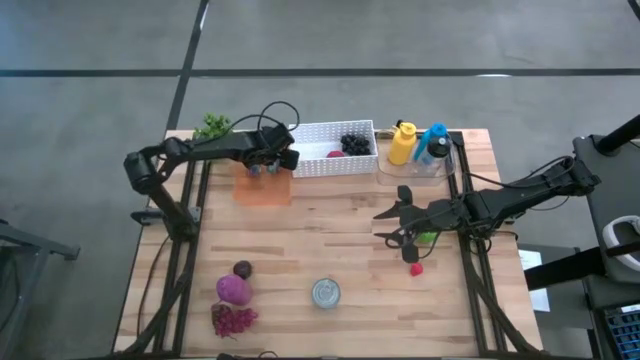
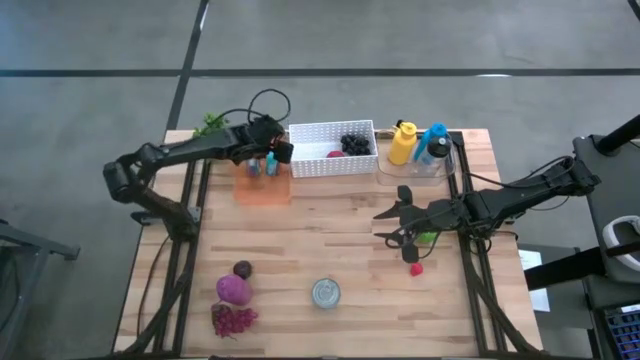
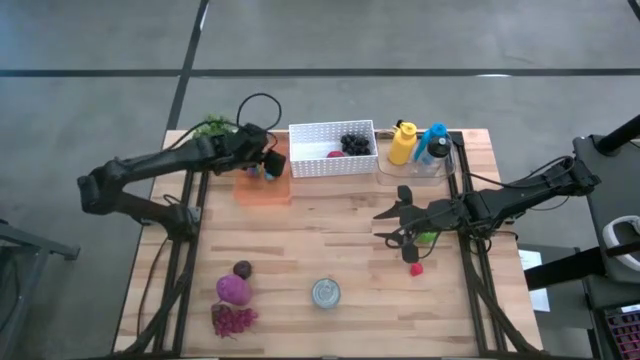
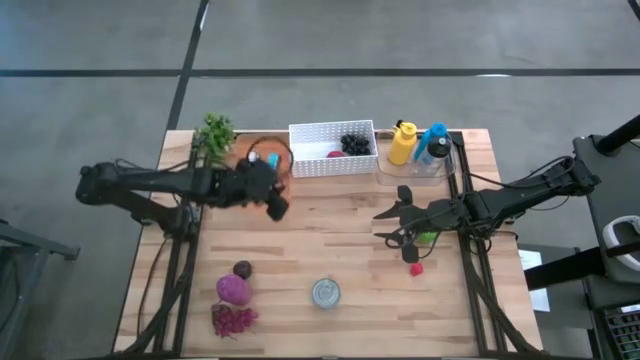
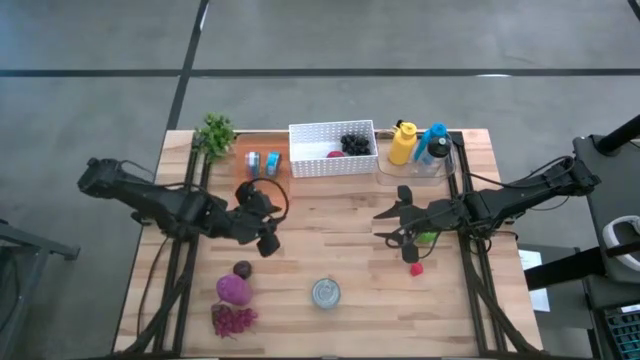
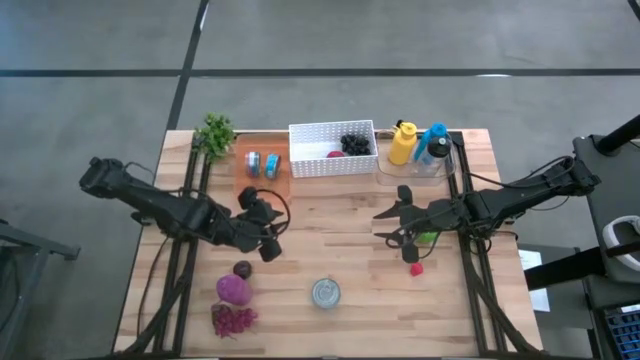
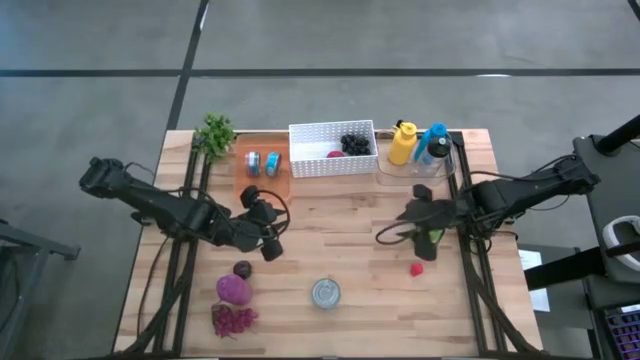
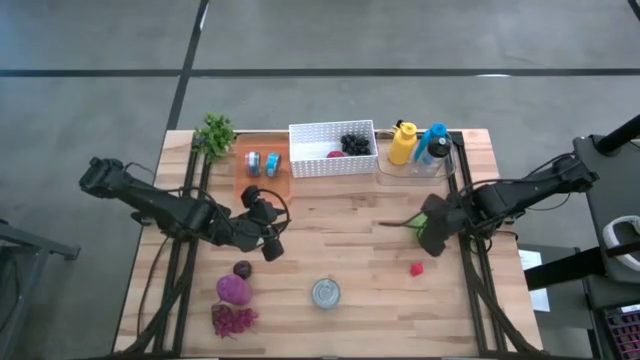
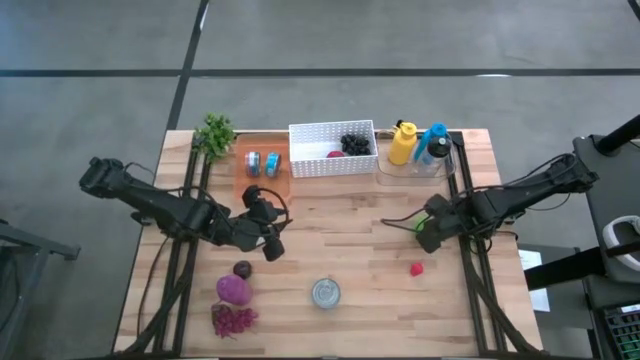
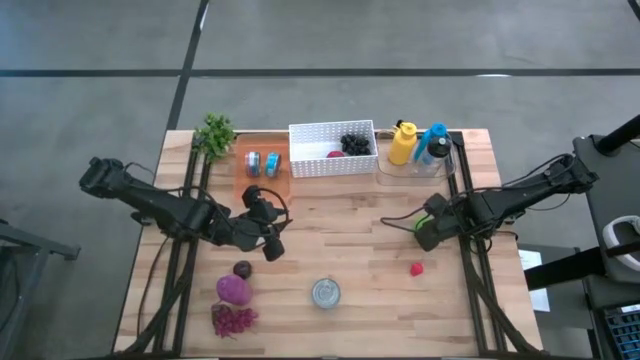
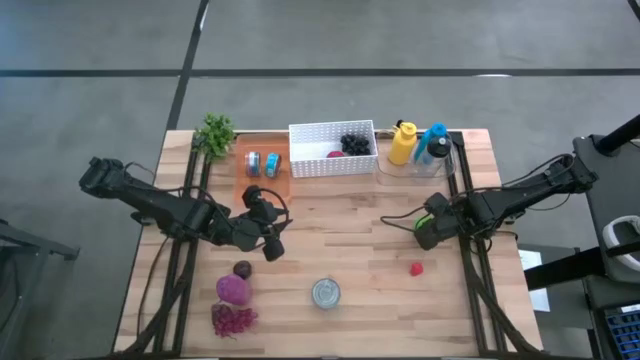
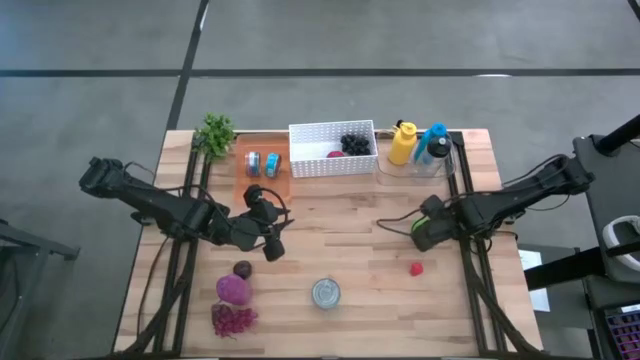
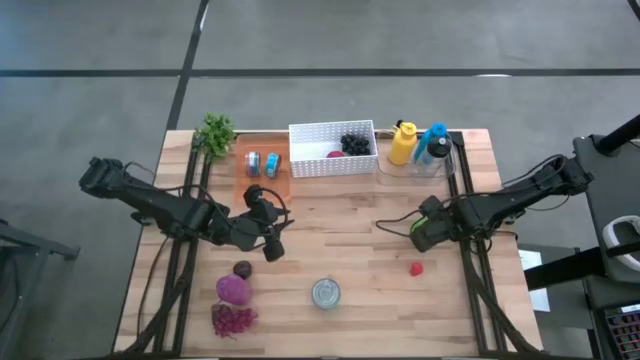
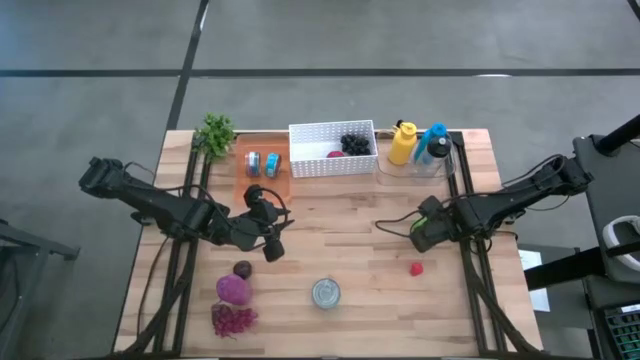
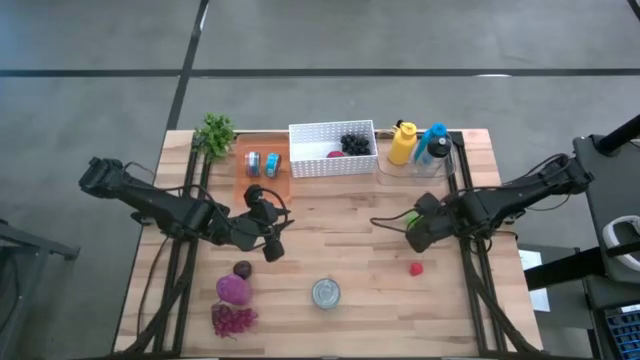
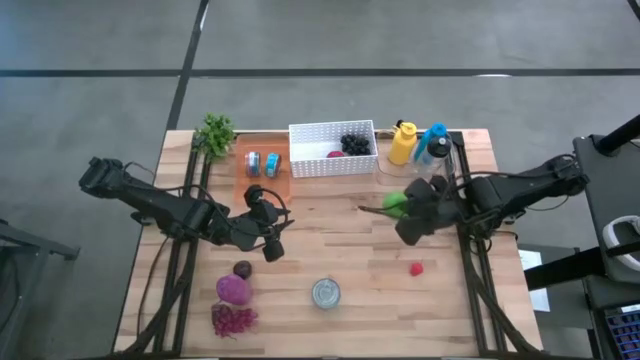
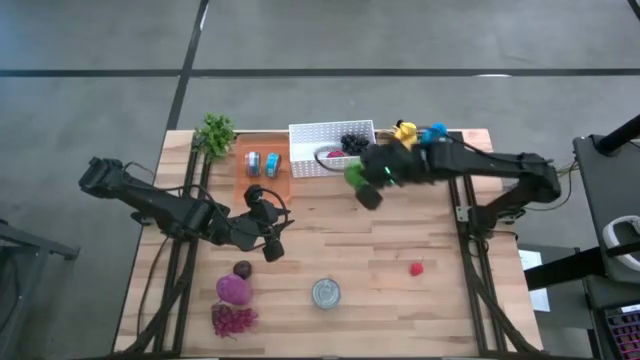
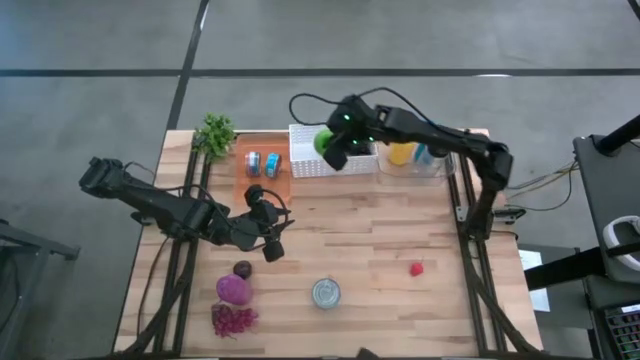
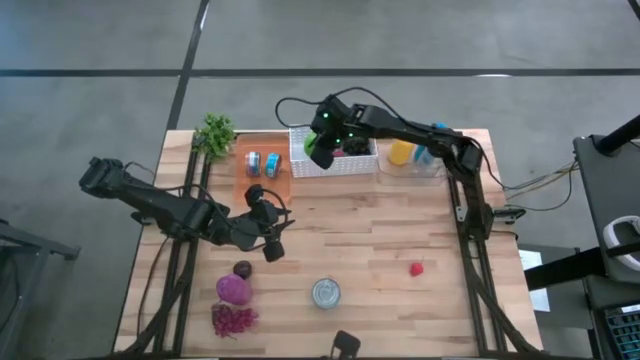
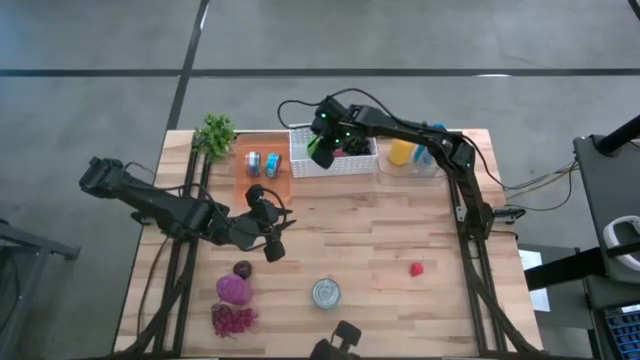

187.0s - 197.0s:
Task: Pick & Place Food Item
Put the apple into the white bin

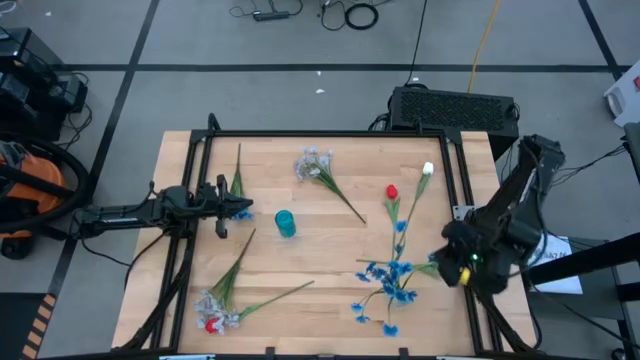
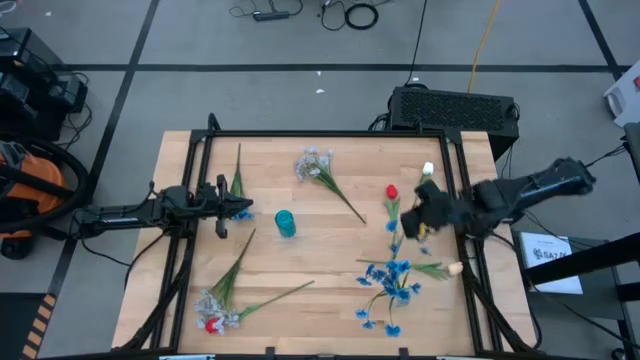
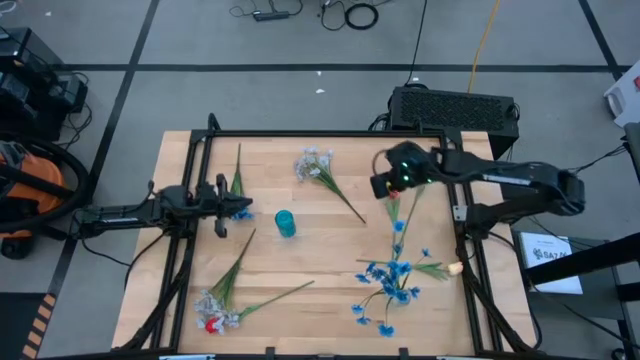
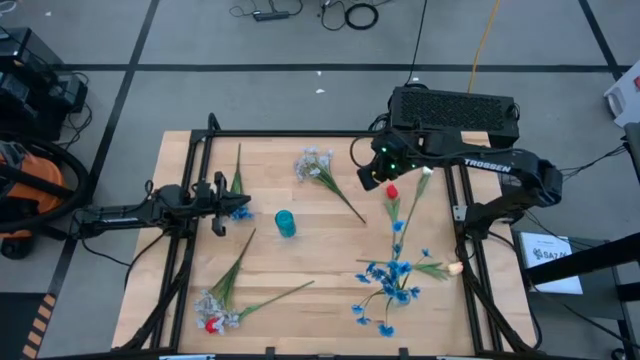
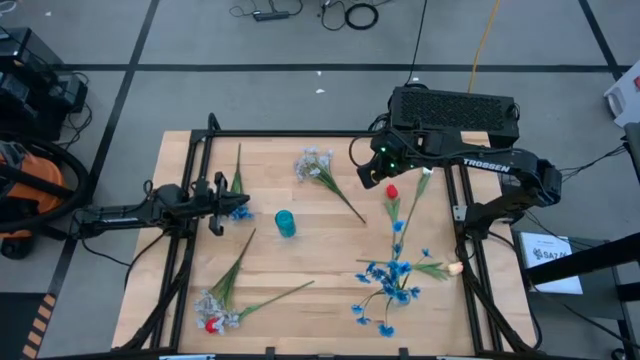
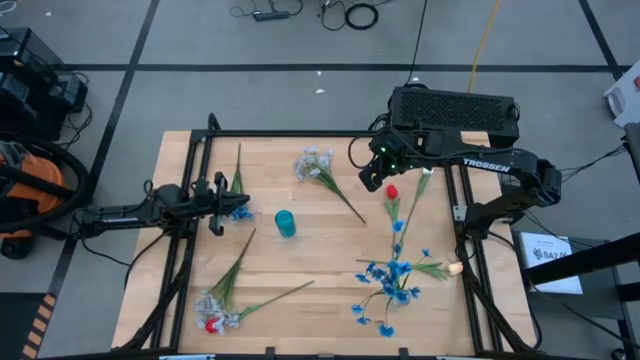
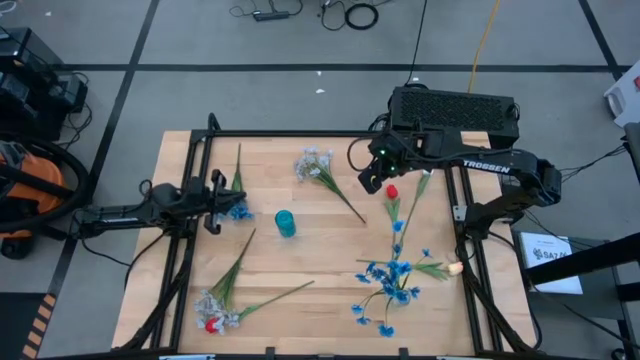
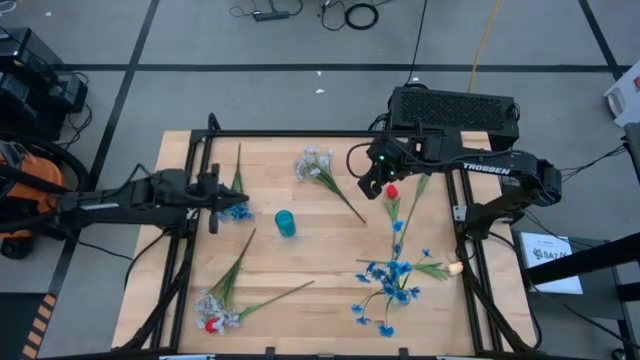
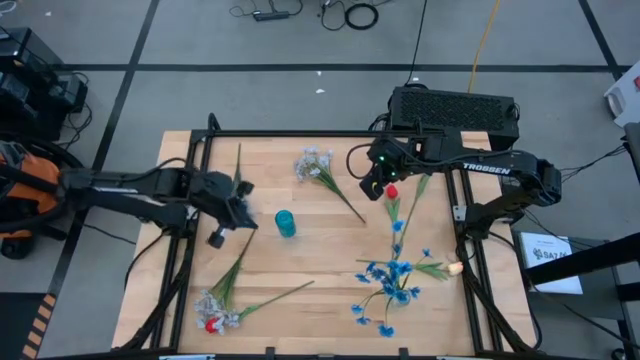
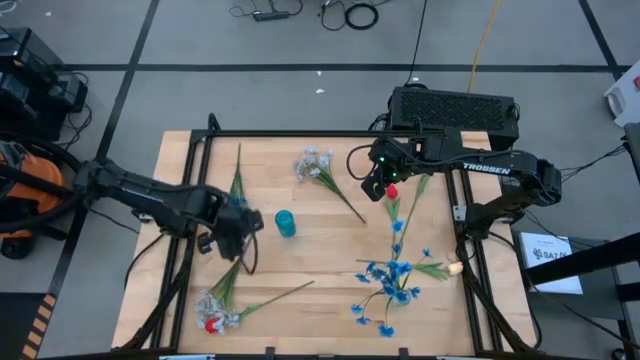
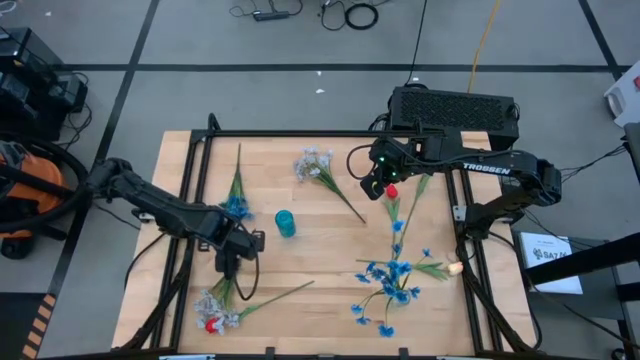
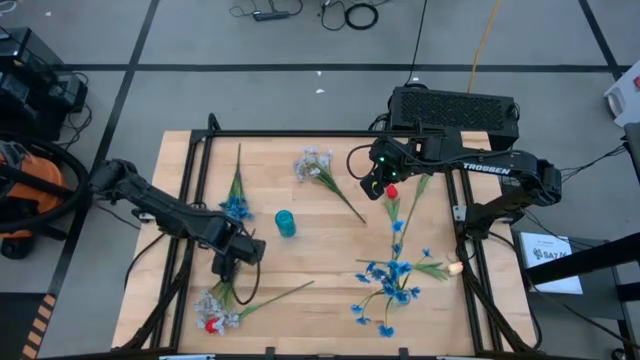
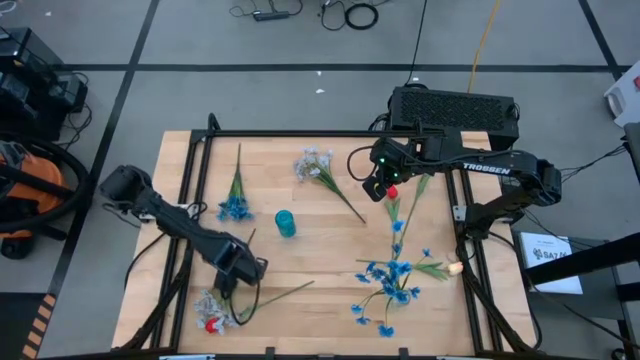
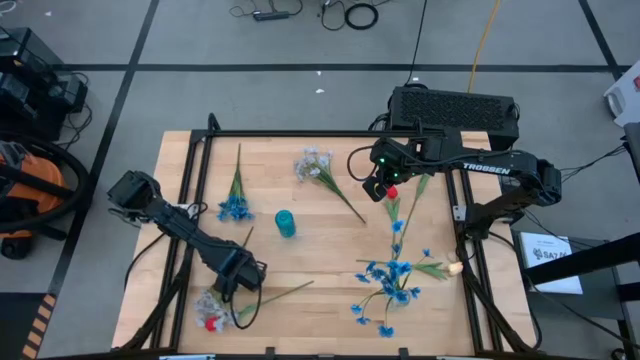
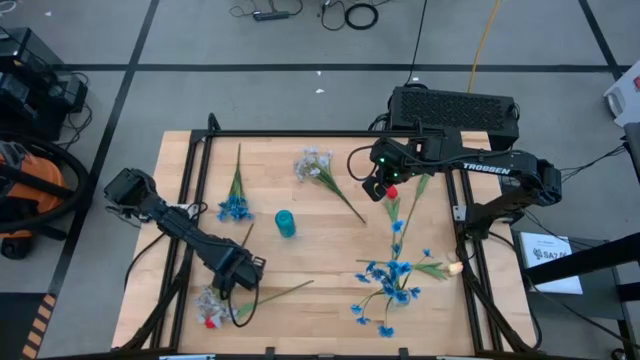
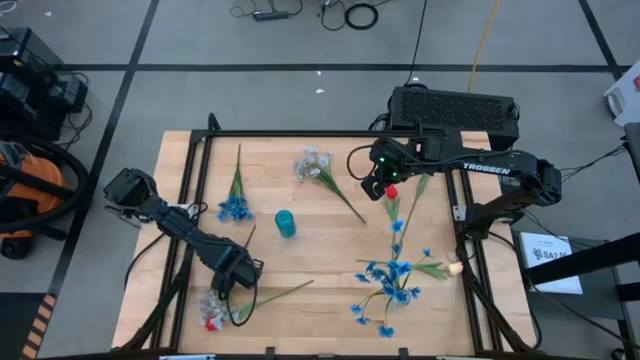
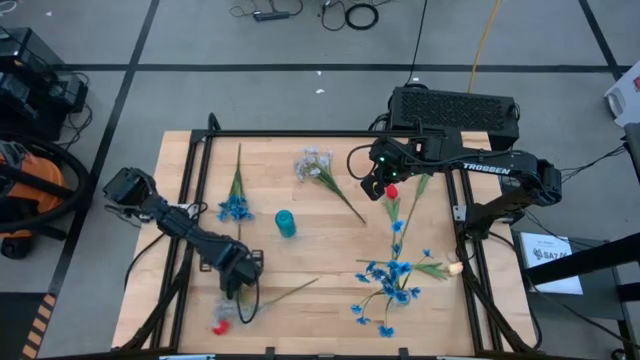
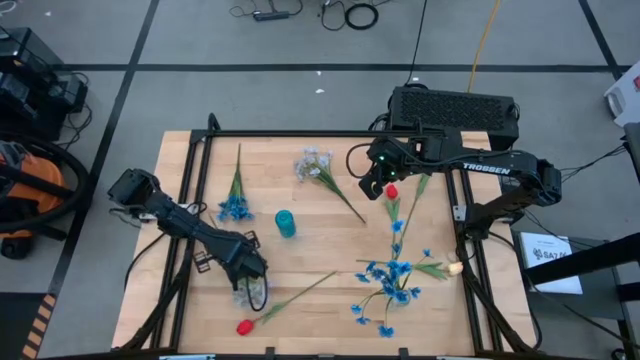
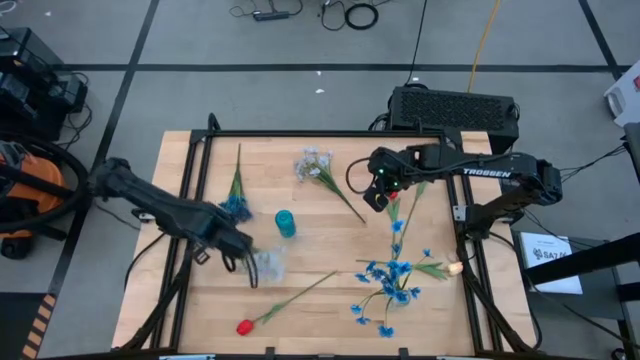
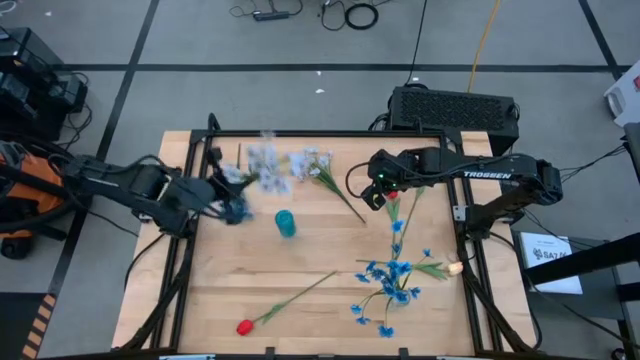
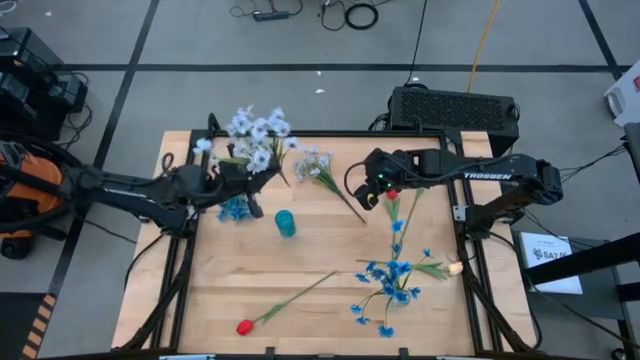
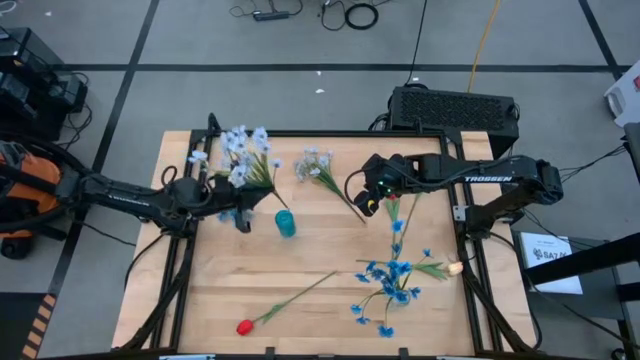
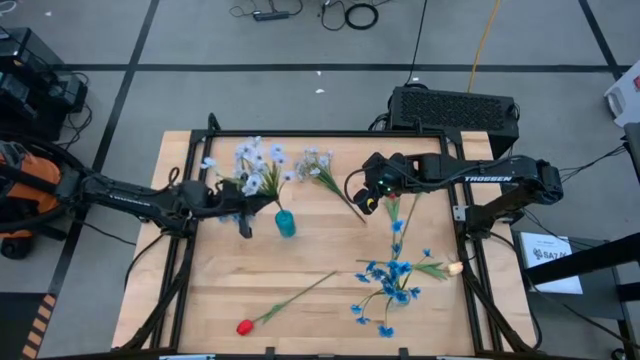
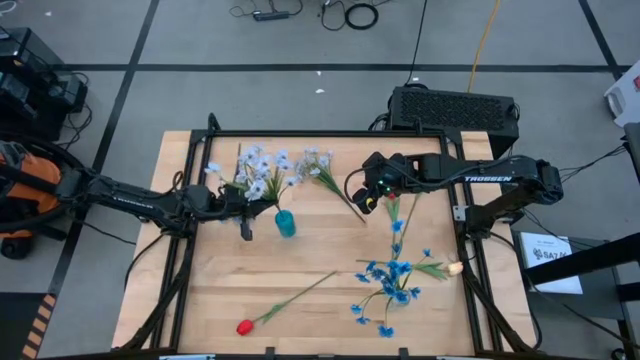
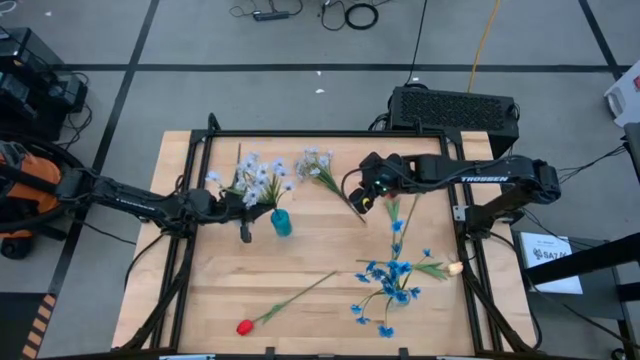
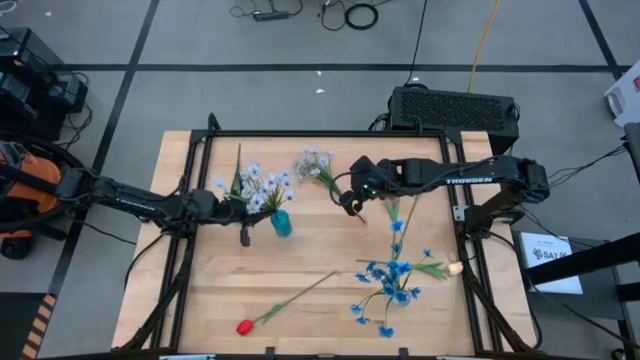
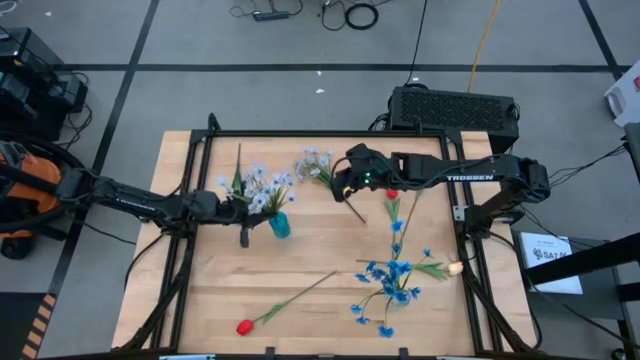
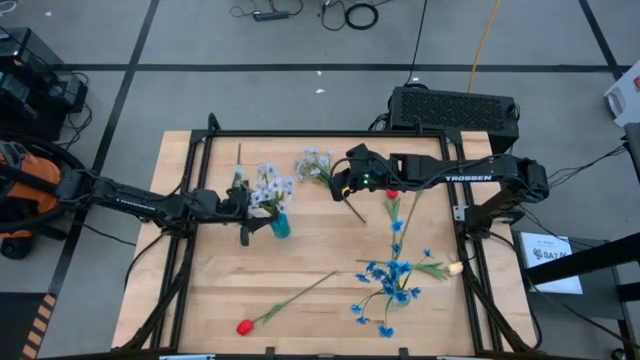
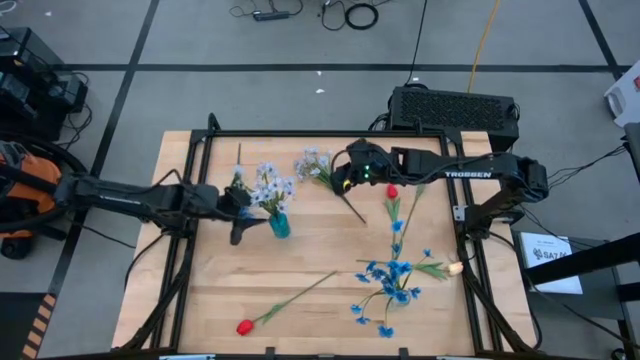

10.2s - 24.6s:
Task: Sort flowers into vase by color
Put the bottom white flower into the blue vase
